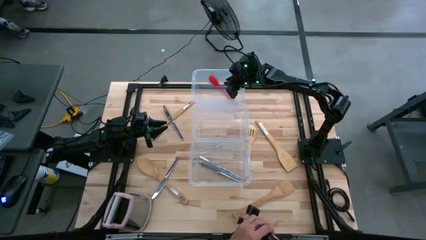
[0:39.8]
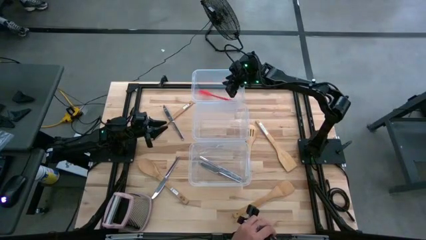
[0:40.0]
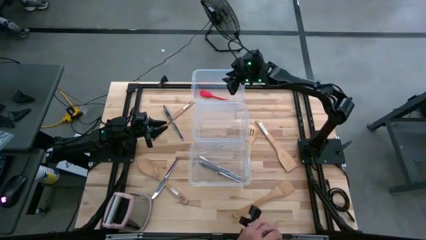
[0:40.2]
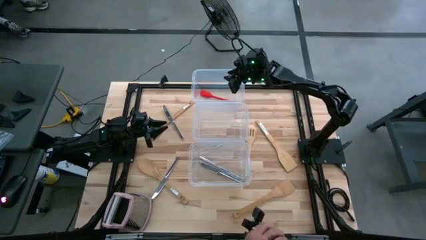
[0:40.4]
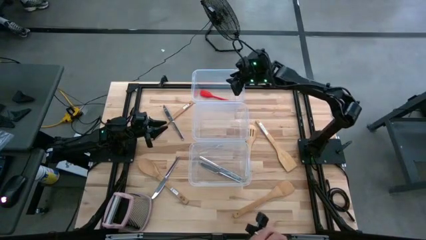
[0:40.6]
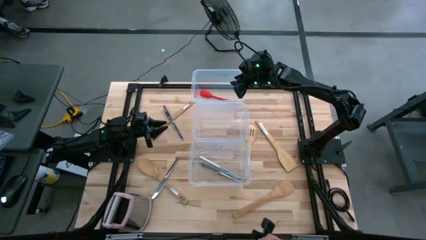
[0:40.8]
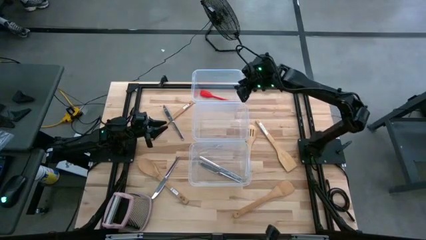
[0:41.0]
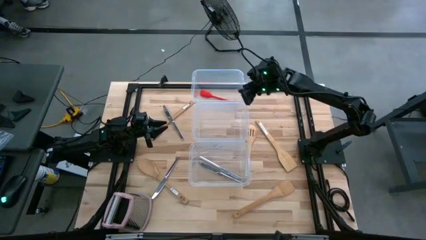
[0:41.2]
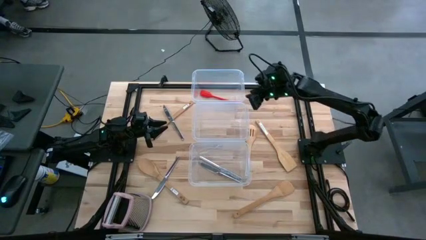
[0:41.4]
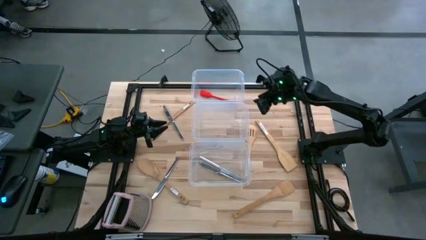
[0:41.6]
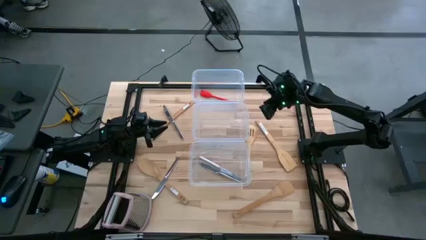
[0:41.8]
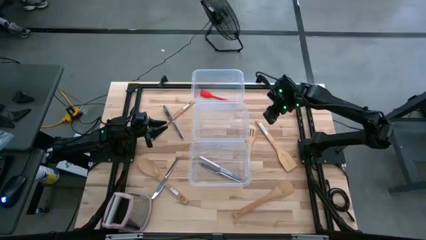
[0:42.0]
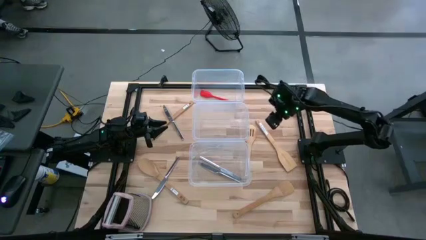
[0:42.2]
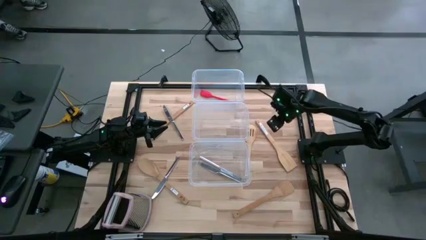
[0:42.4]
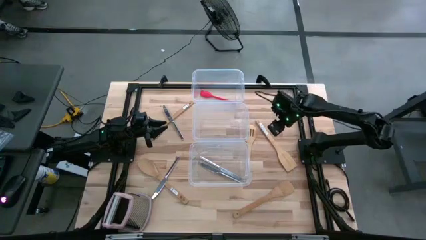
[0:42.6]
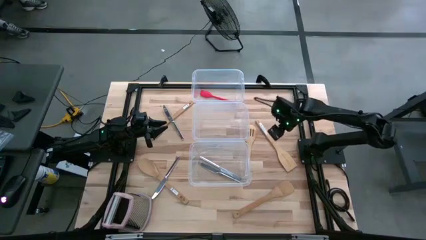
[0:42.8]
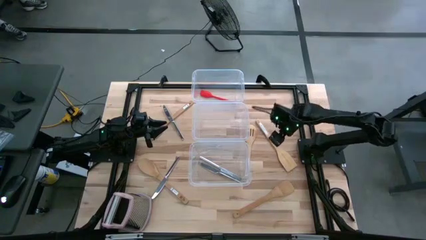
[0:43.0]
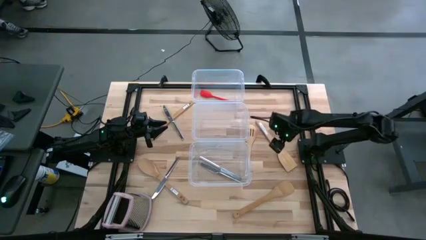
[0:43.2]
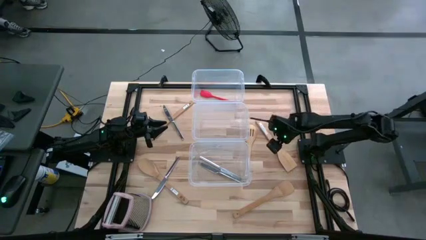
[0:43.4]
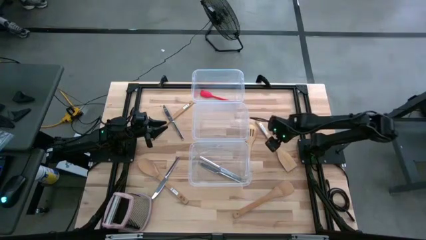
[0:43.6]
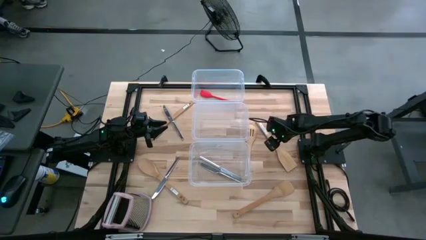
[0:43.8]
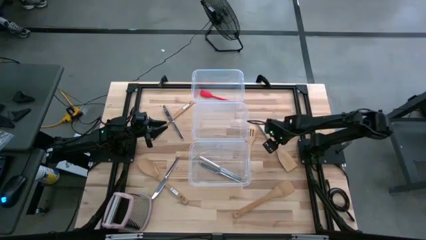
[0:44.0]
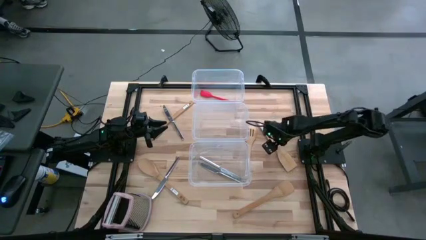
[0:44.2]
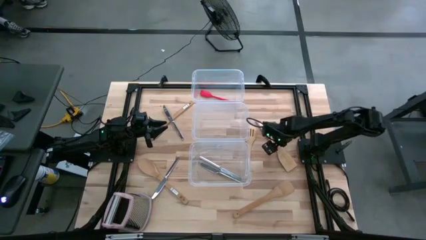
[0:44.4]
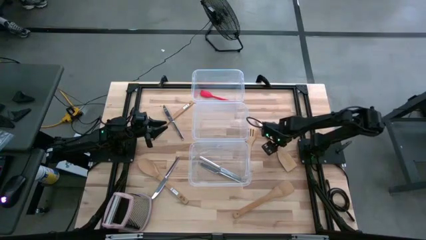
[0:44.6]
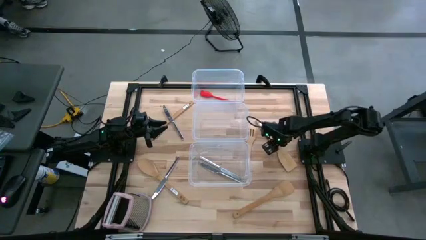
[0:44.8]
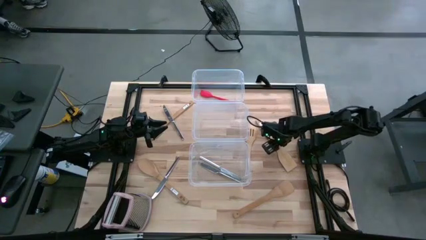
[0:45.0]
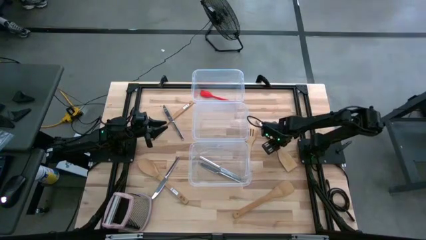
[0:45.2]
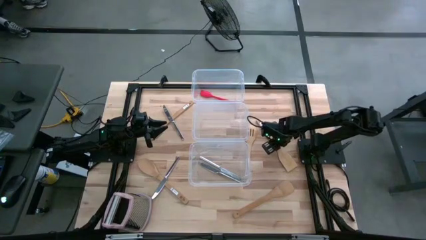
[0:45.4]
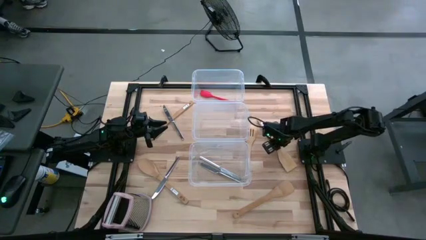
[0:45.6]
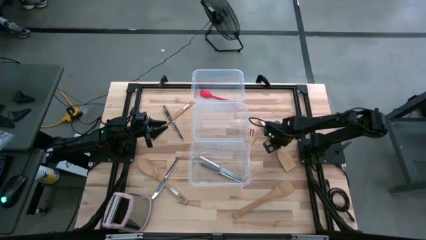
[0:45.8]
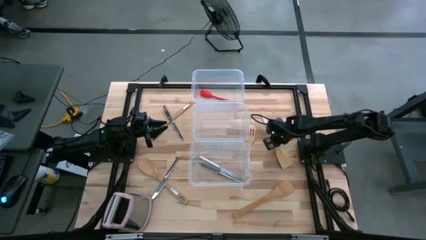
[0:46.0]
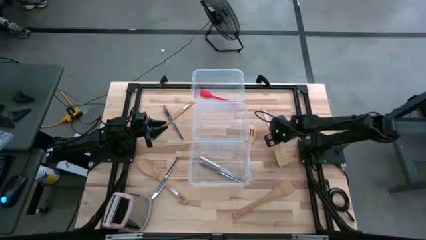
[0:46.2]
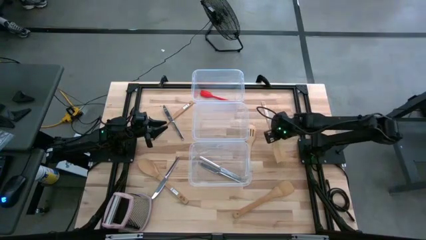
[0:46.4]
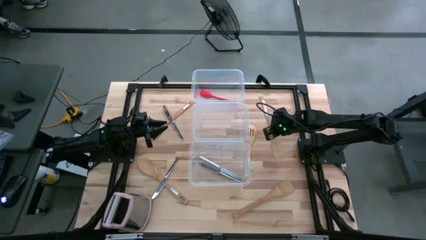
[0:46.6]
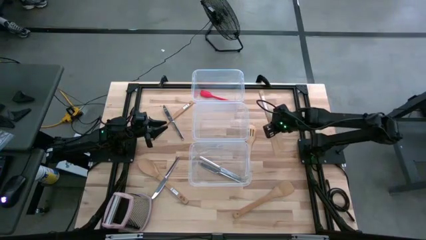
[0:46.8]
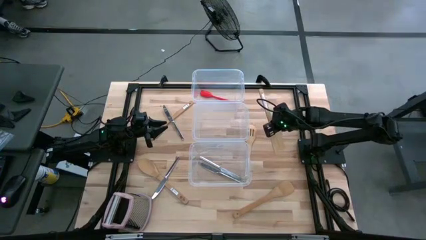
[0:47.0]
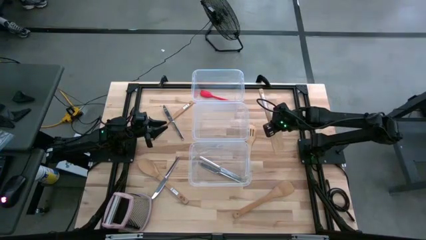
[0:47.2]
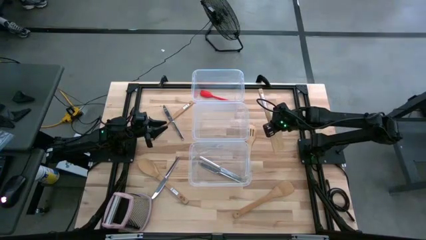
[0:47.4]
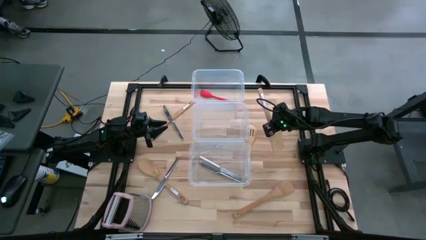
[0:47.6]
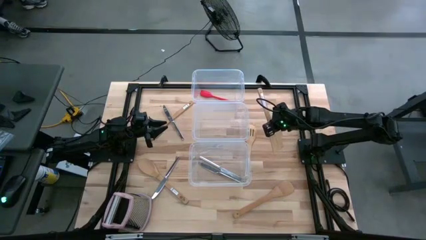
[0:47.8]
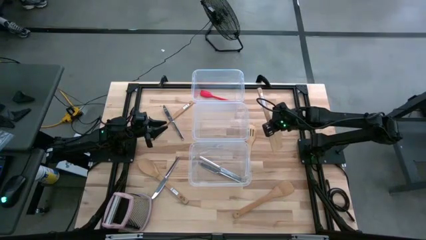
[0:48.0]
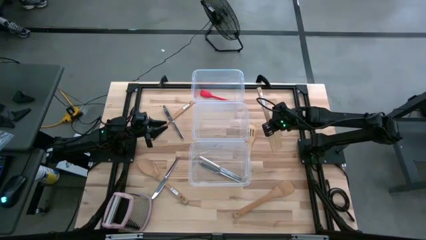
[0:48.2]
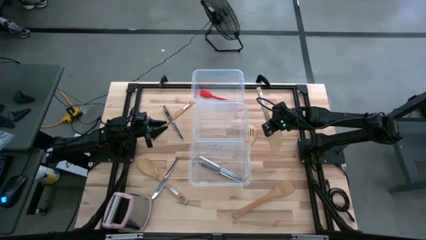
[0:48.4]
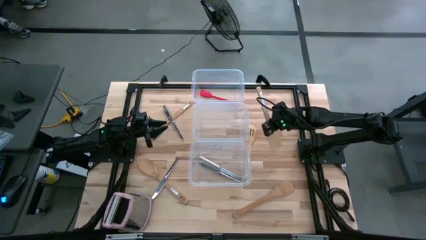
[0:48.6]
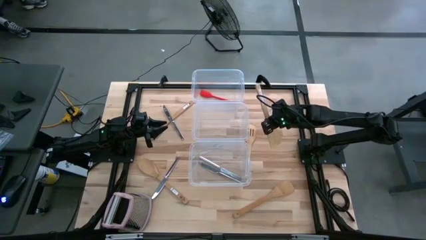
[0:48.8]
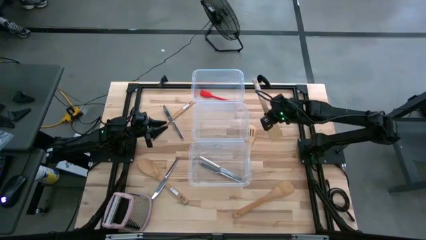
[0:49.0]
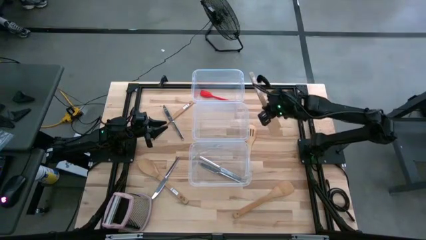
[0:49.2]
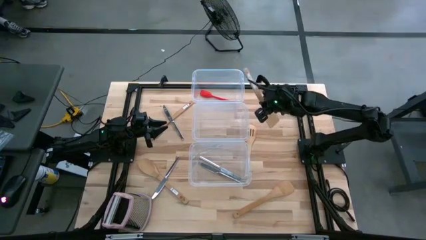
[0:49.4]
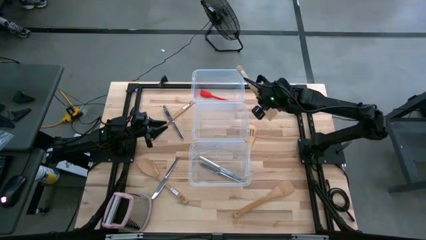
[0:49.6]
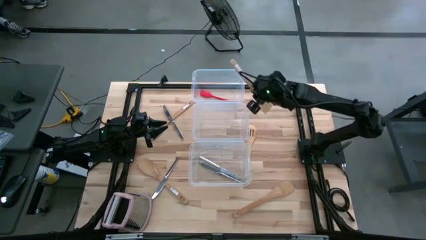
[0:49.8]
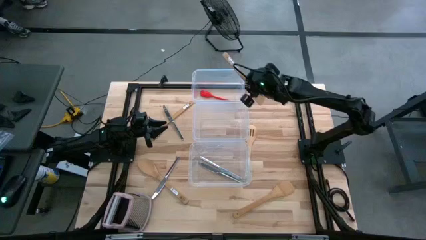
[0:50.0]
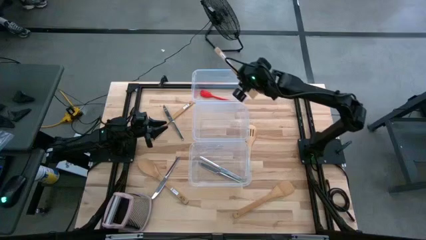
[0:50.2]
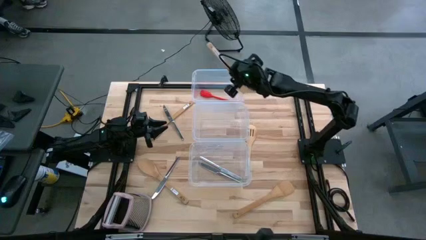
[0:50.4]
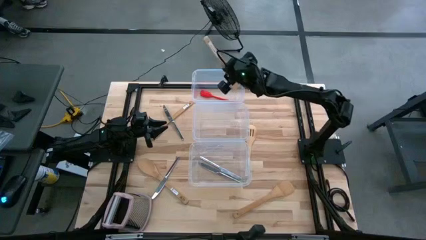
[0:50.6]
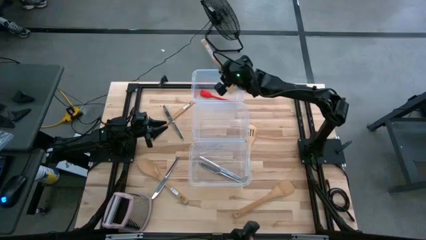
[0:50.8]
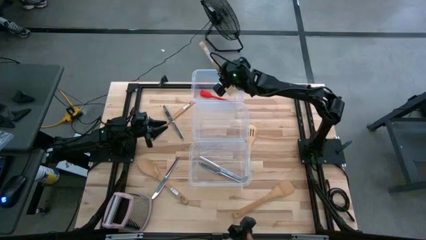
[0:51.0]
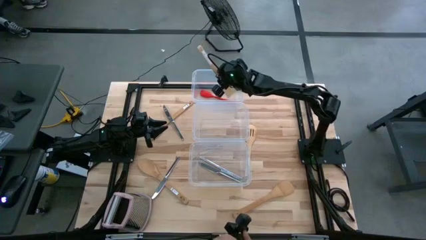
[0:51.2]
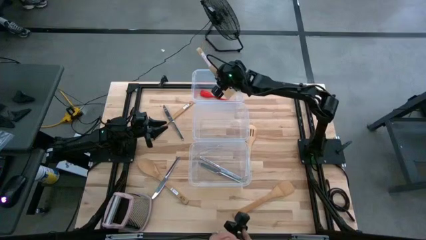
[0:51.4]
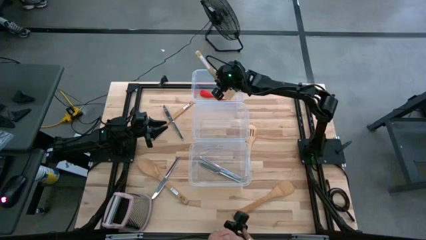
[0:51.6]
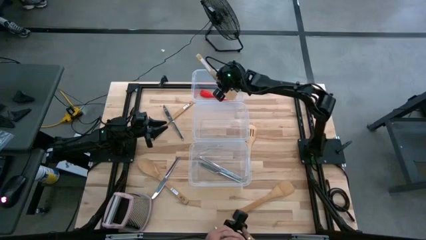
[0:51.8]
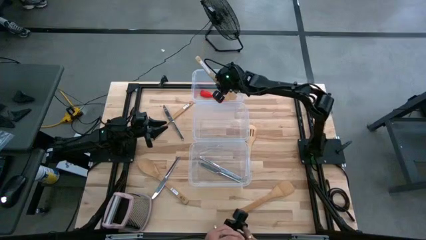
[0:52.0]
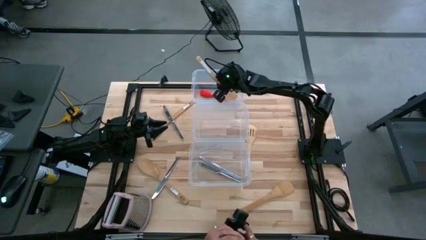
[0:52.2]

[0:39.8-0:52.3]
Task: Pick & Place Kitchen Items
Put the brown spatula into the top transparent bin

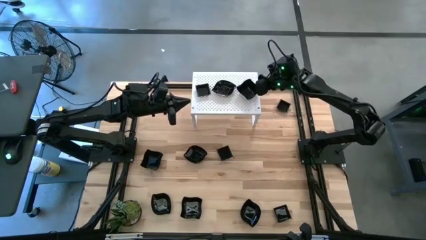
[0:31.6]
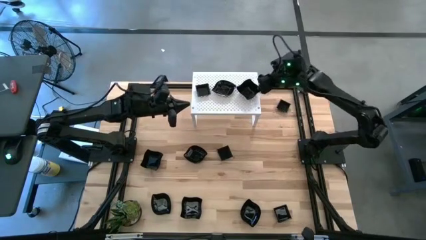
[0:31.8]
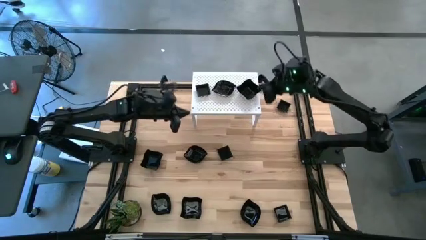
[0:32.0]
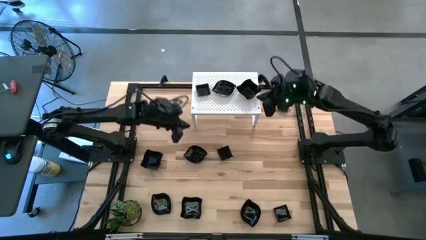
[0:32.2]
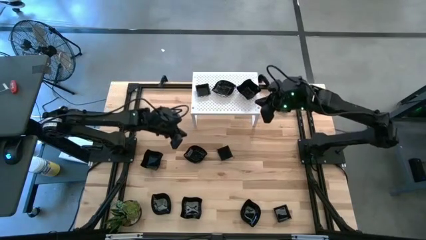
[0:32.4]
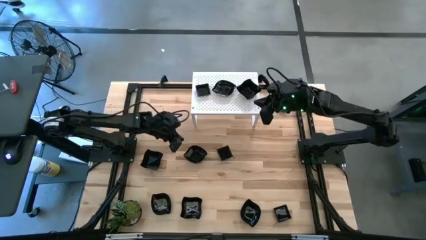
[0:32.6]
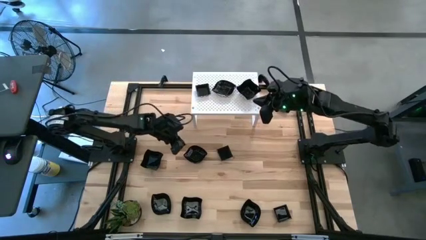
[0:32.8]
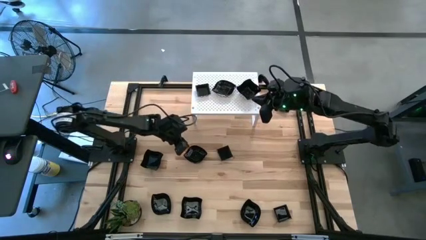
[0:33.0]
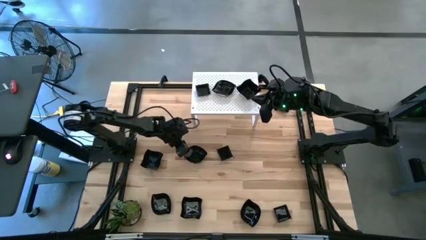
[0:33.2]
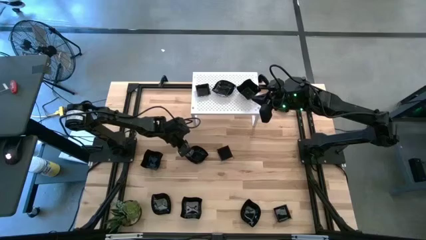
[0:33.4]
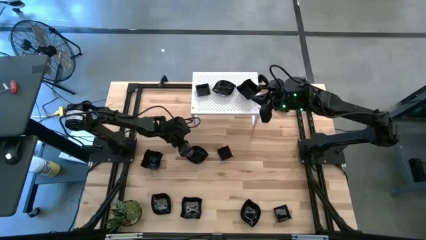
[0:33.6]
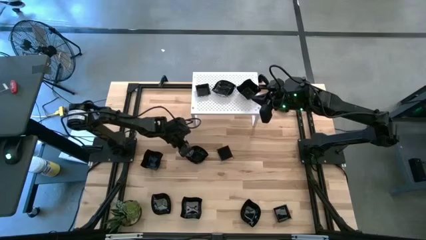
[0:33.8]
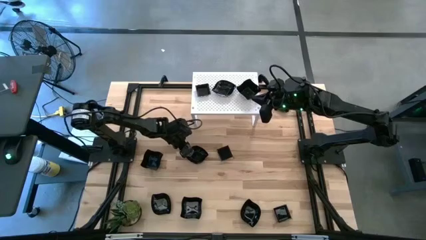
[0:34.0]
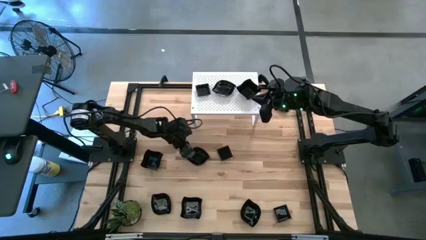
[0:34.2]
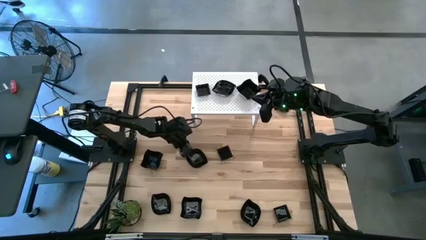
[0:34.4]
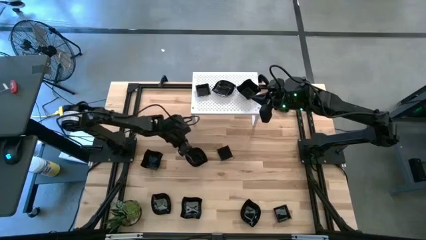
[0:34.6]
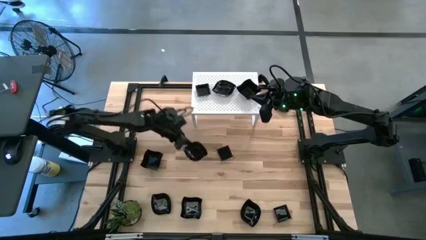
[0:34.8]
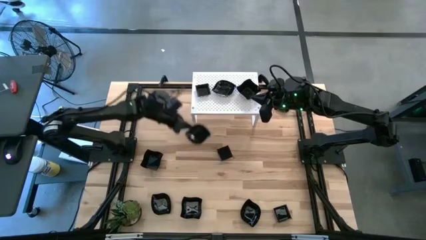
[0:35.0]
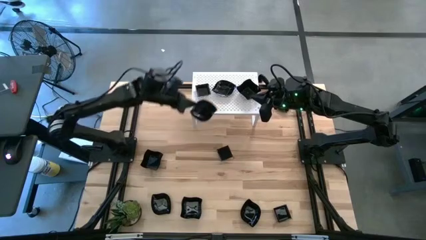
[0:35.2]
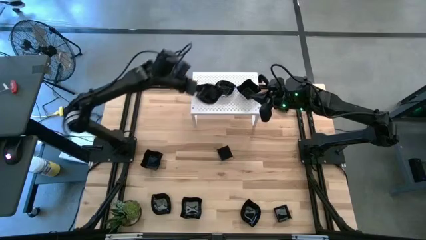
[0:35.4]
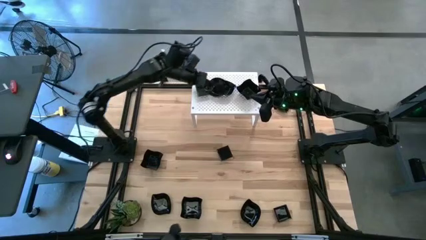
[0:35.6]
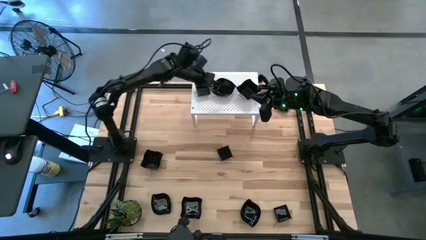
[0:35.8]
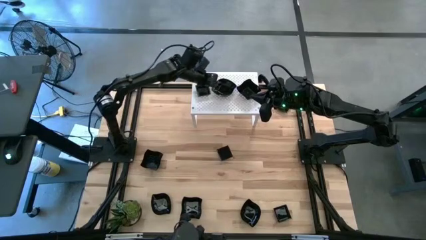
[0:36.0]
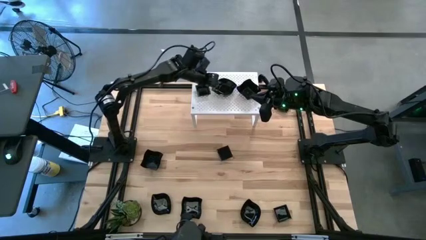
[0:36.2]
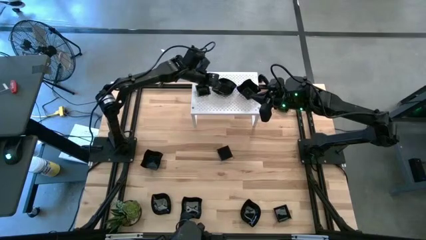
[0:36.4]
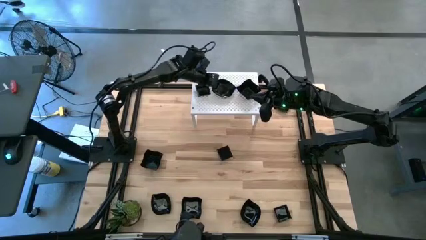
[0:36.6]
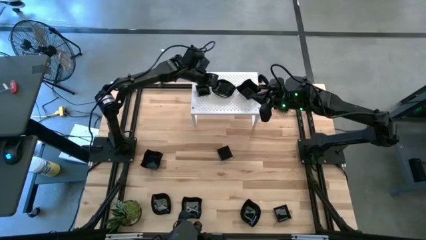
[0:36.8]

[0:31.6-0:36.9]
Task: Pick & Place Mini shaped plates
Stack the black leaf-shaped plate on top of the black leaf-shaped plate on the shelf
